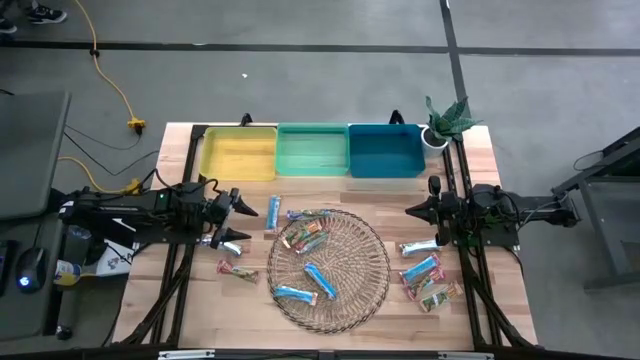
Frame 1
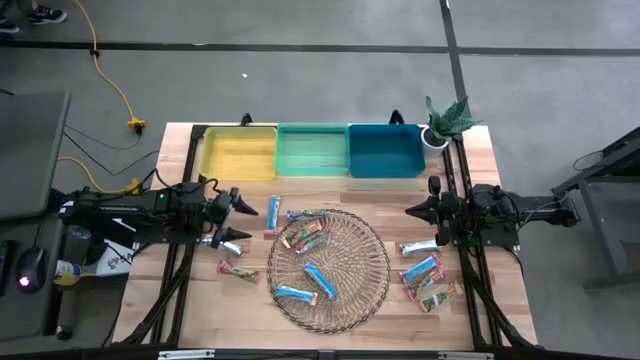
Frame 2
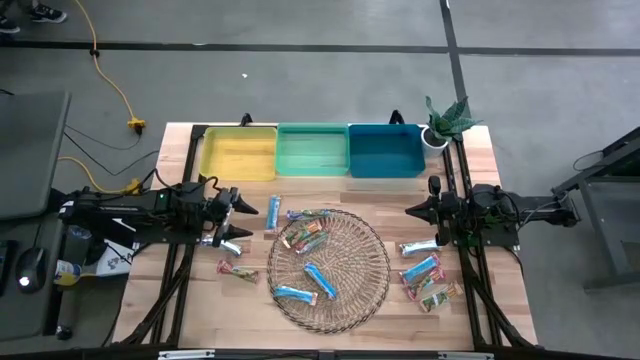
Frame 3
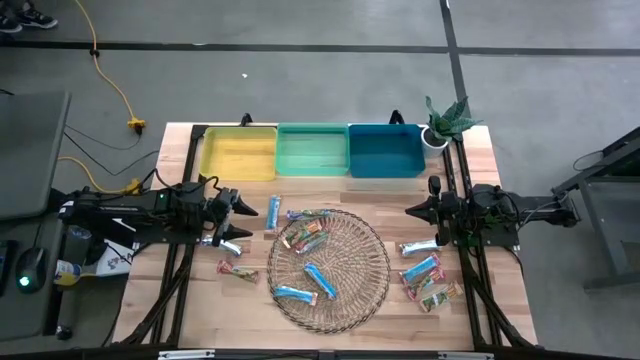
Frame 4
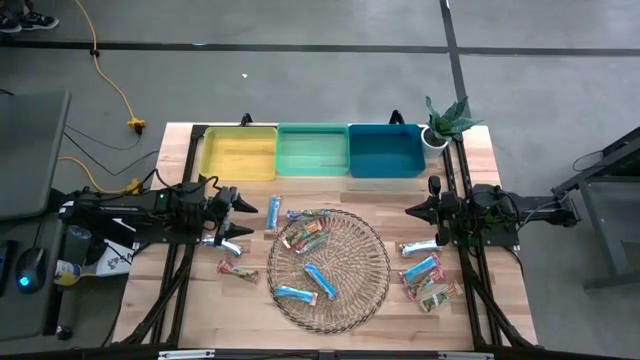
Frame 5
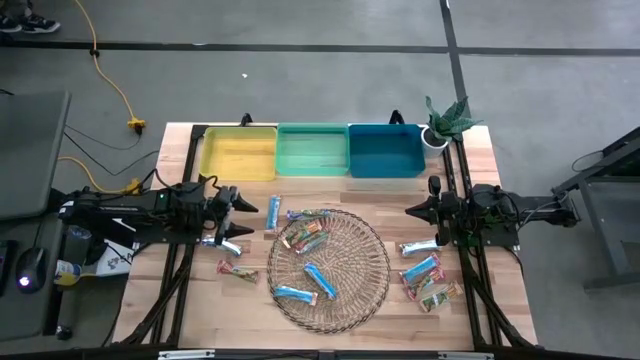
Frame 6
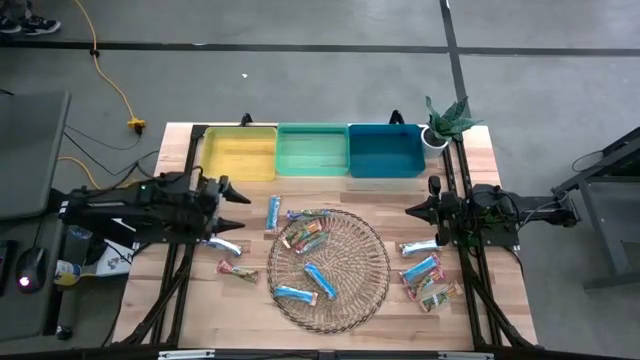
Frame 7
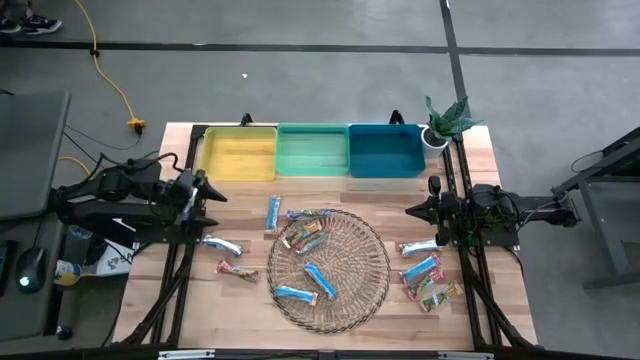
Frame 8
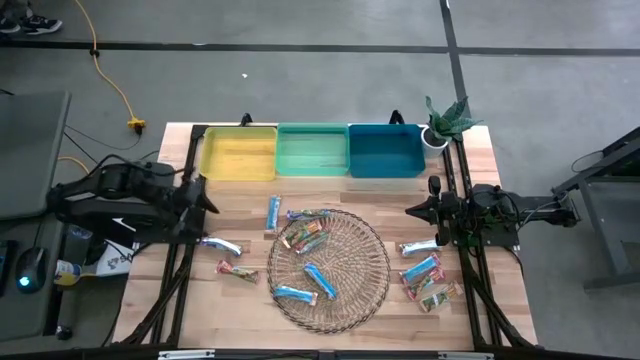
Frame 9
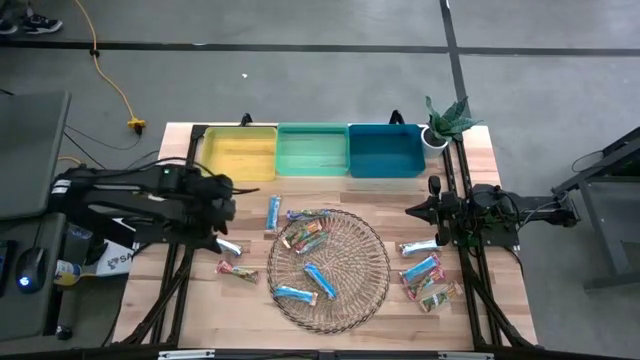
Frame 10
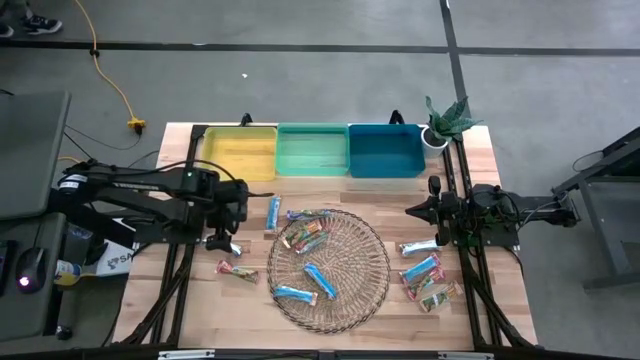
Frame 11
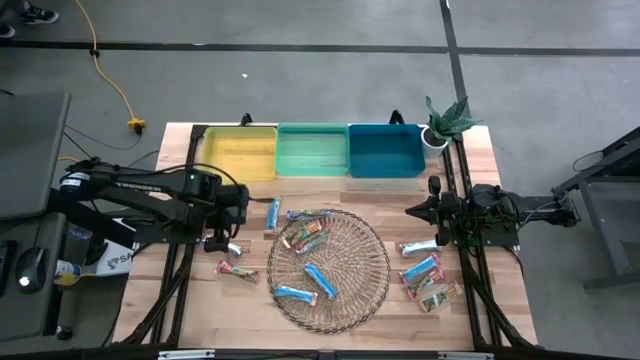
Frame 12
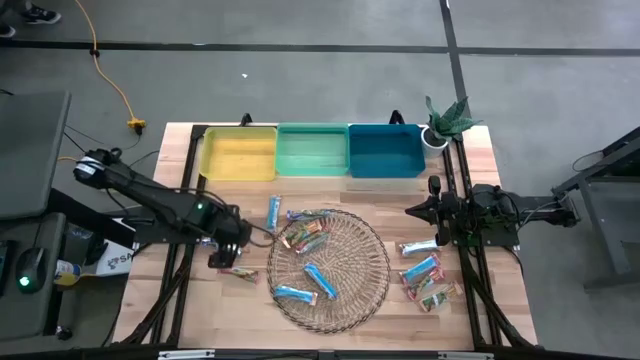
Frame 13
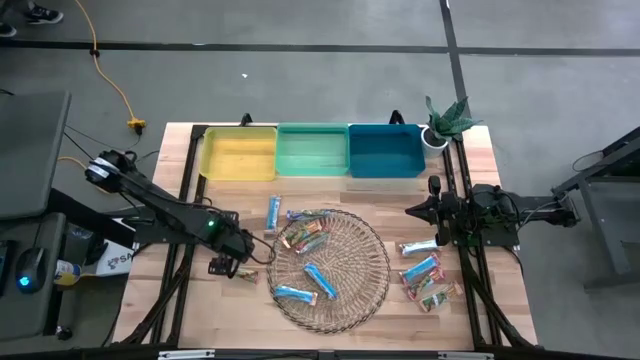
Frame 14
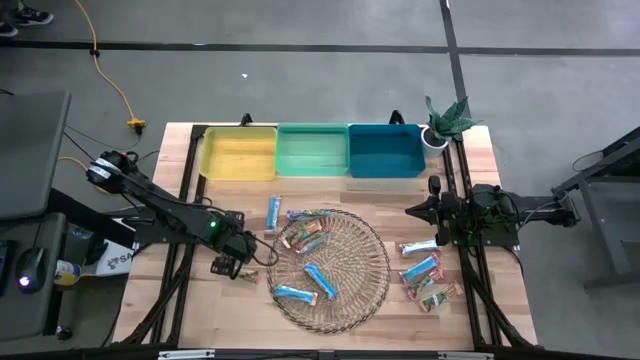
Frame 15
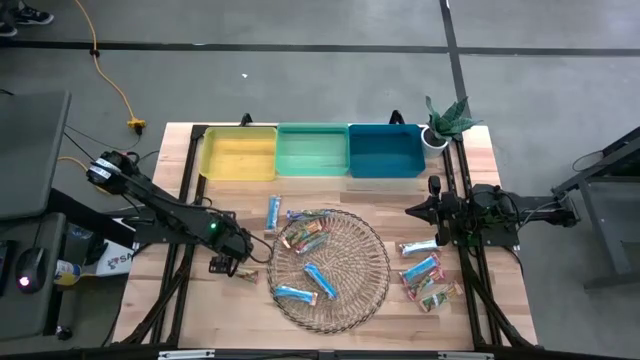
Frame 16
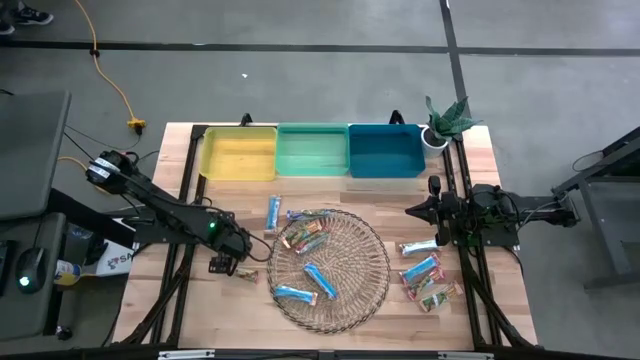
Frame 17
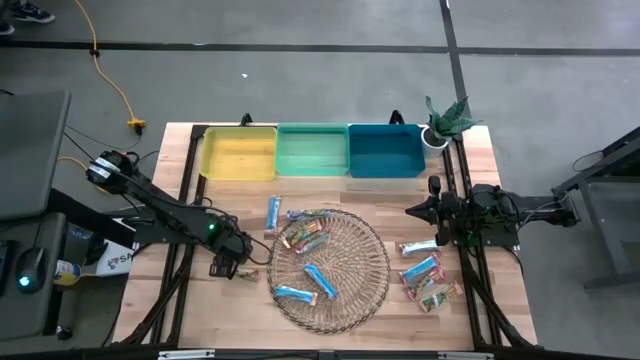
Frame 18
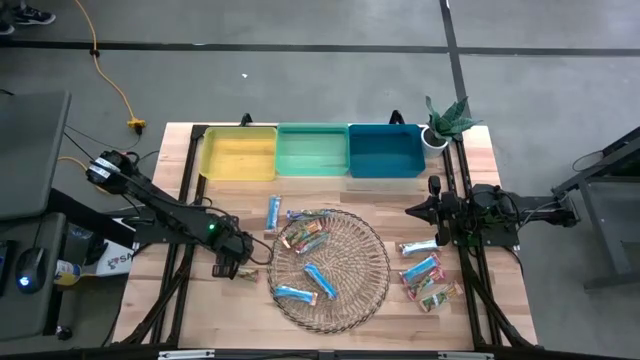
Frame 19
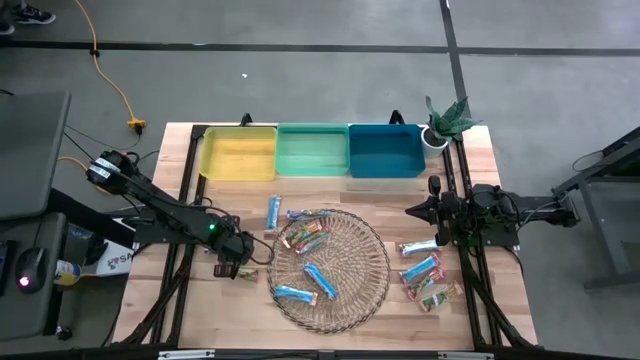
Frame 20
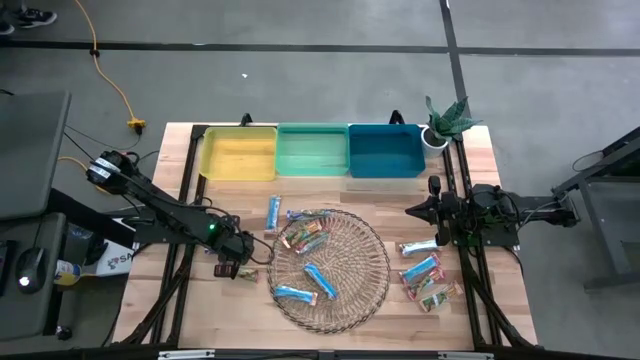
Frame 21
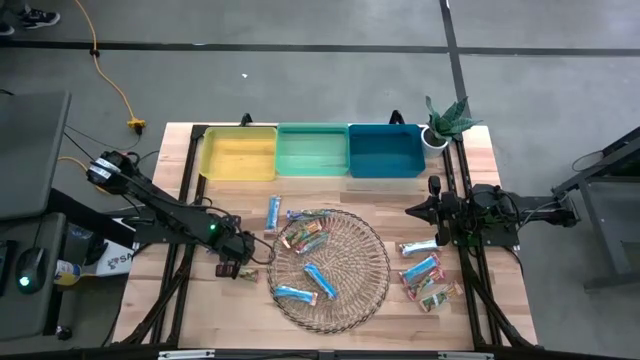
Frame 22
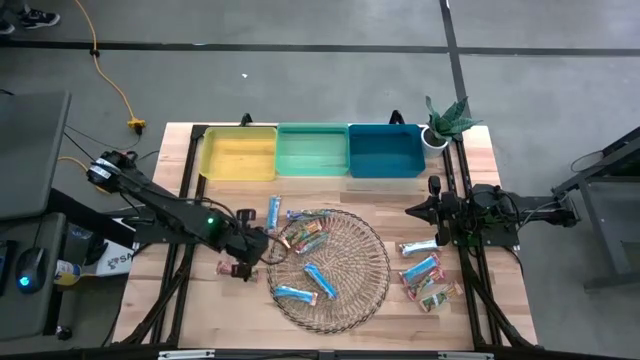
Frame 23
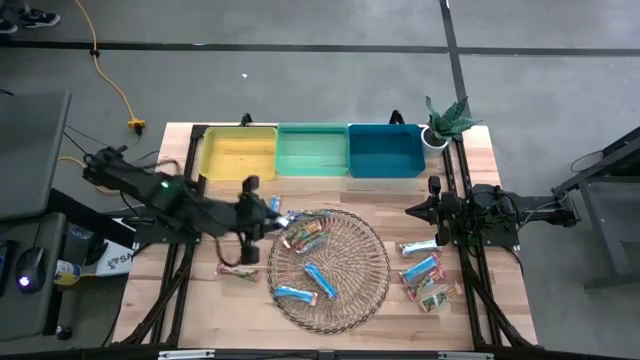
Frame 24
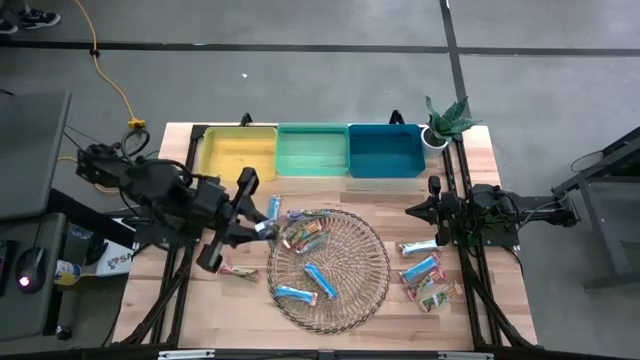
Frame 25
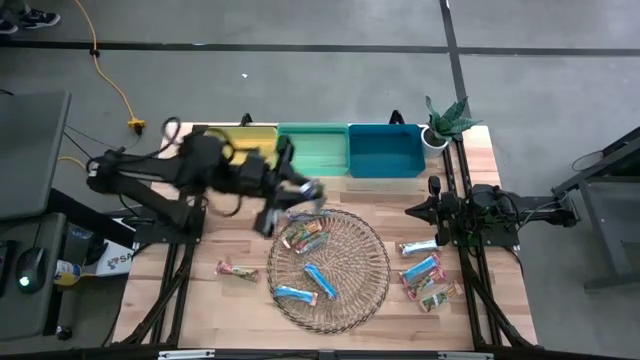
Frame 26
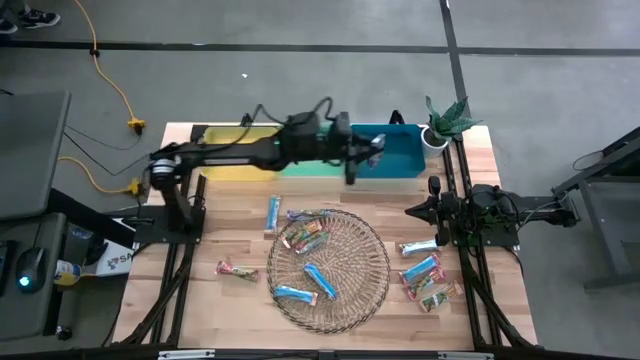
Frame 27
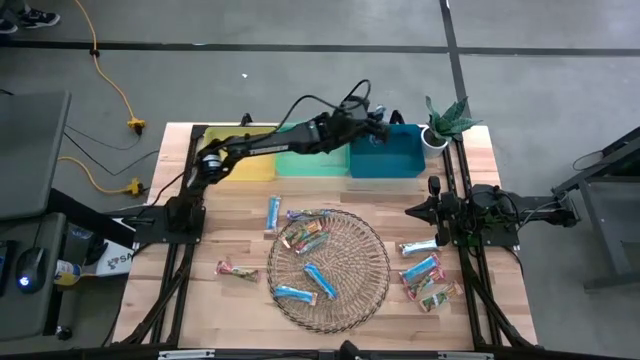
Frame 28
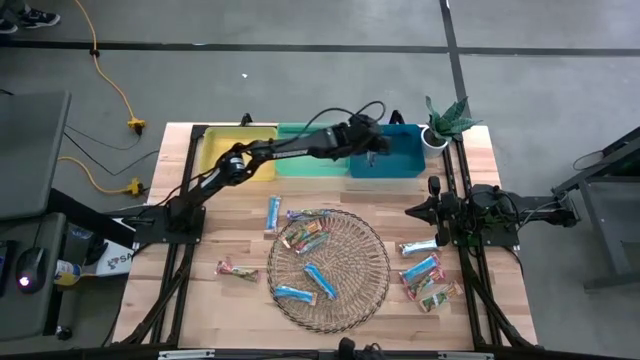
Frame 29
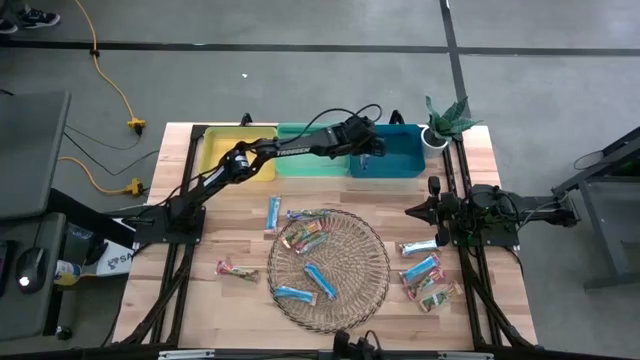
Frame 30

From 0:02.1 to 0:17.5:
Task: Pick and place Granola Bars by type
Put the left blue granola bar into the blue bin

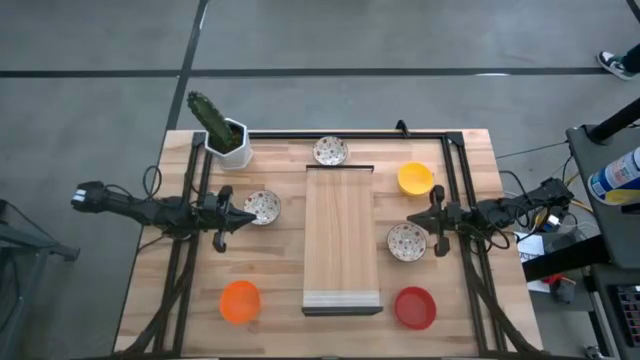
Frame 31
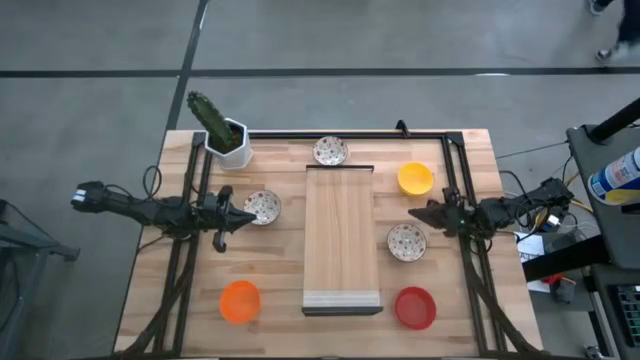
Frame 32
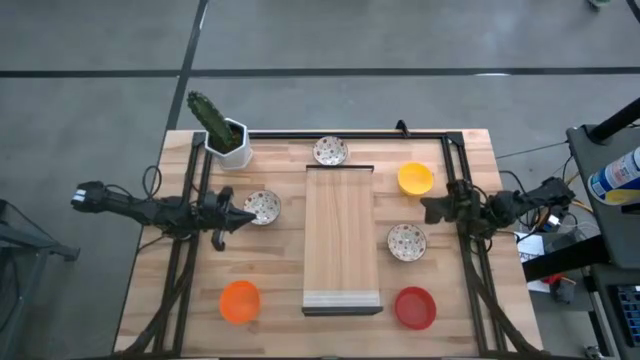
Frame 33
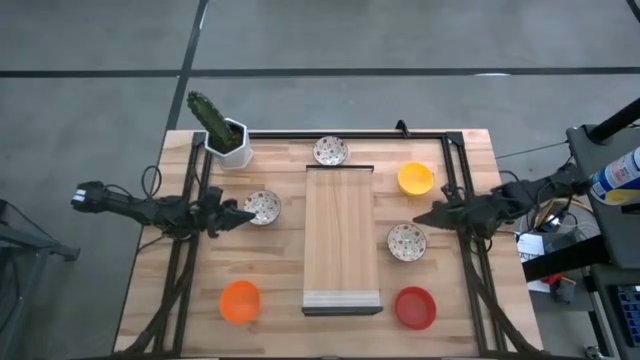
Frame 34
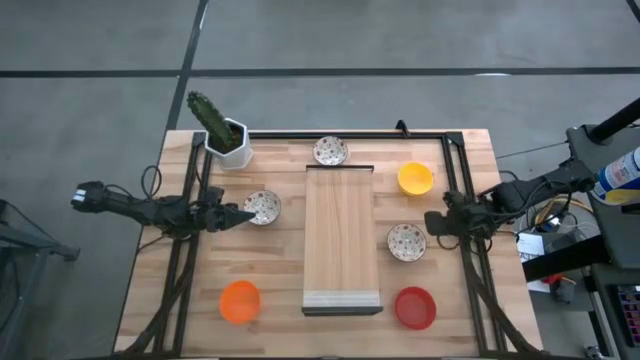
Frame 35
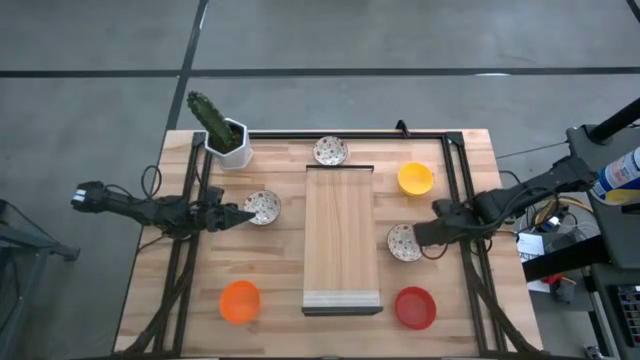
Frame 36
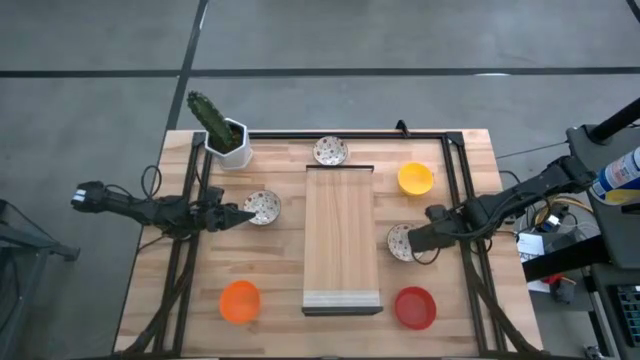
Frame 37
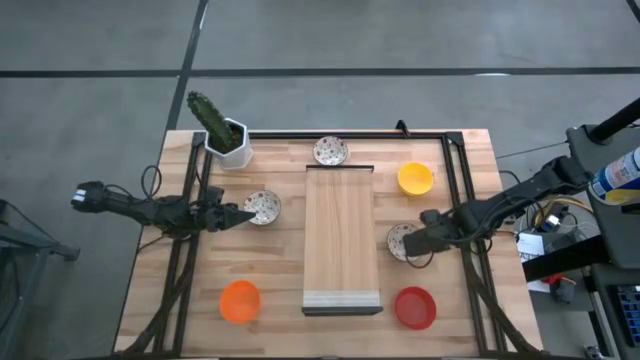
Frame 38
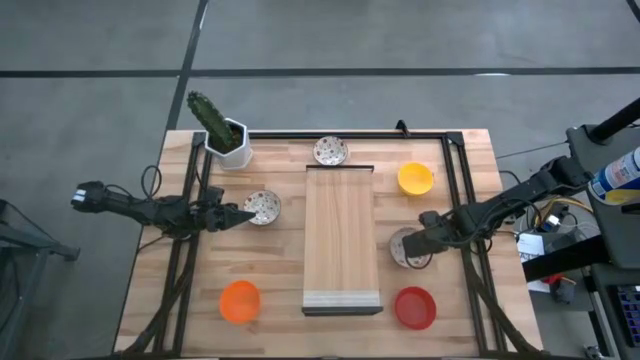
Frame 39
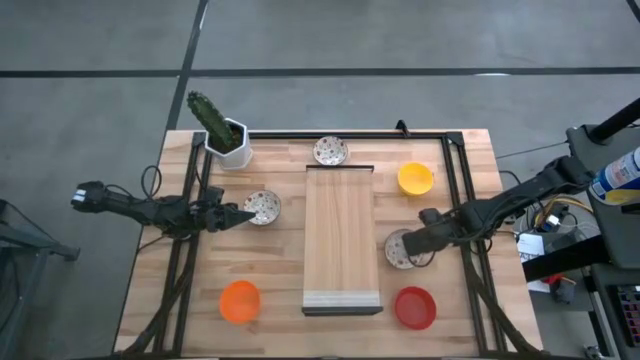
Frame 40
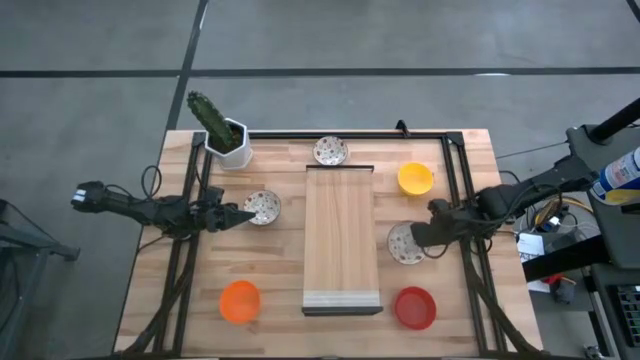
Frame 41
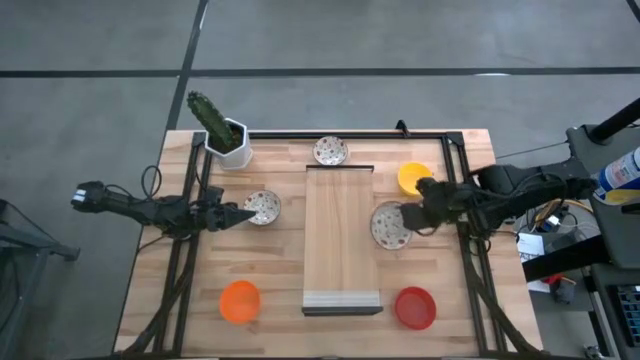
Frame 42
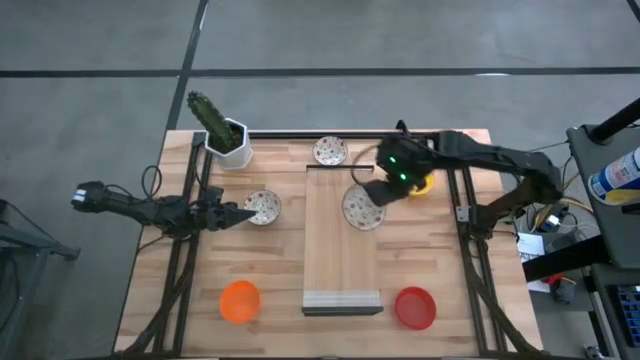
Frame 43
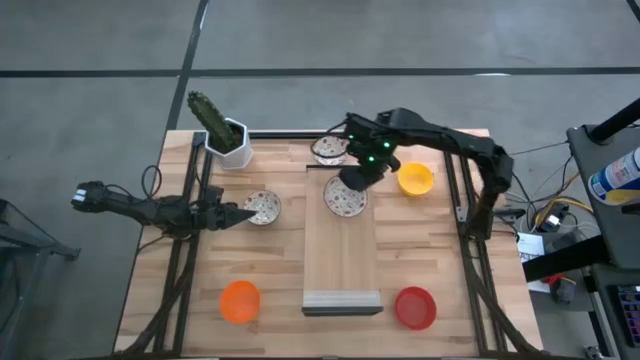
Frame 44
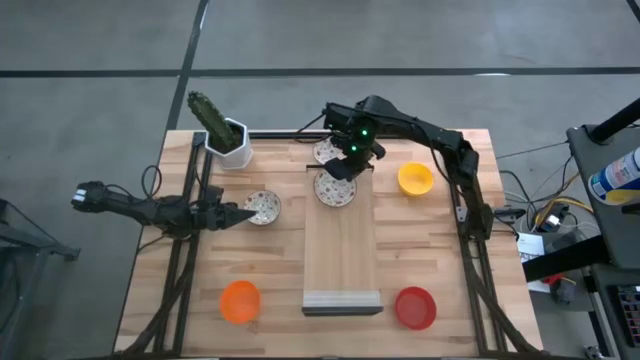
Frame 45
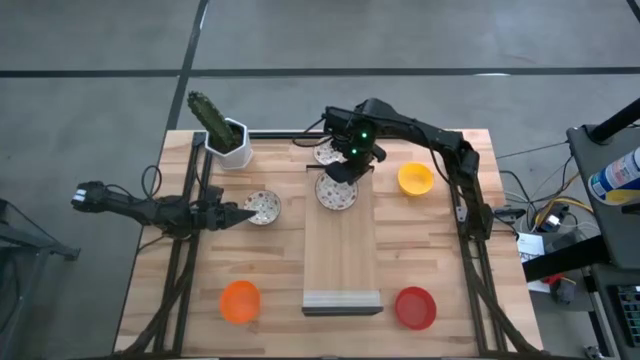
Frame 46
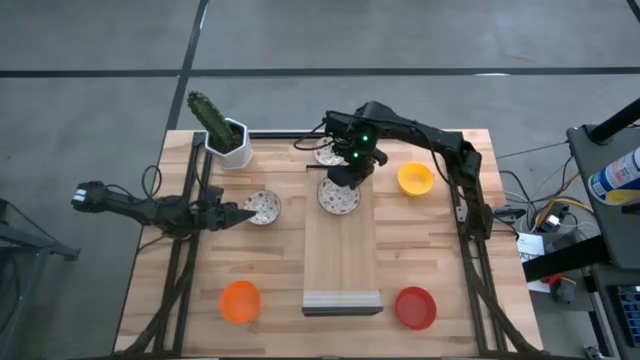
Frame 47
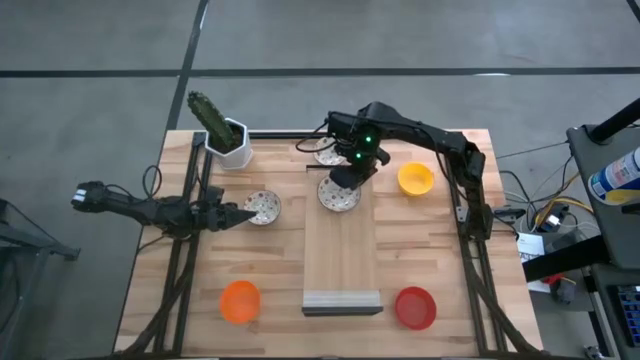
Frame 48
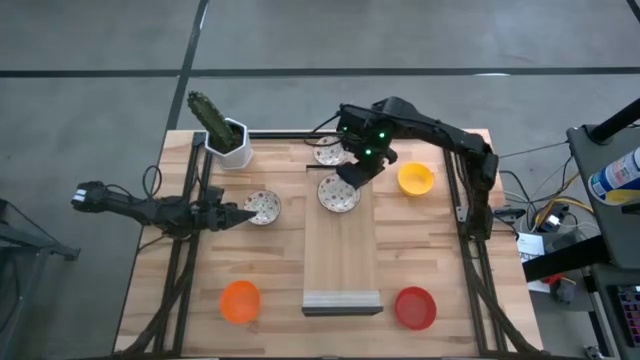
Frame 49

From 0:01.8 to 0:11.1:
Task: Pick & Place Mini bowls
Put the bottom right white bowl on the shelf
